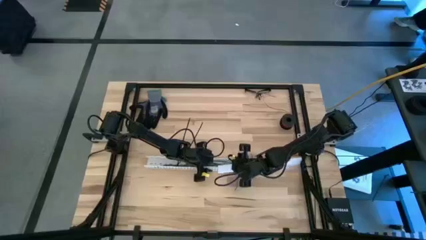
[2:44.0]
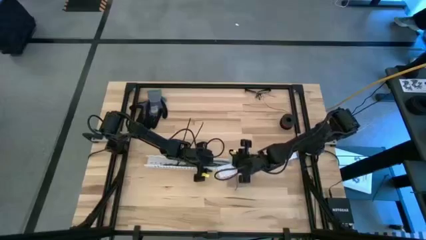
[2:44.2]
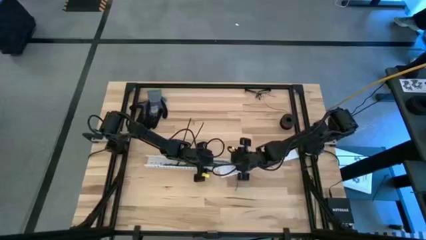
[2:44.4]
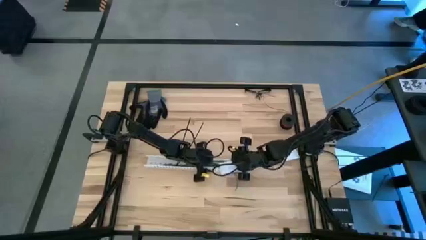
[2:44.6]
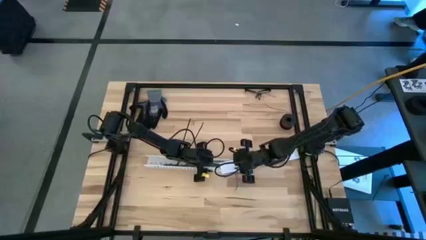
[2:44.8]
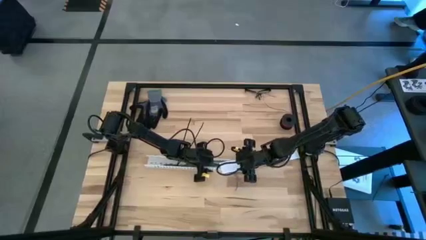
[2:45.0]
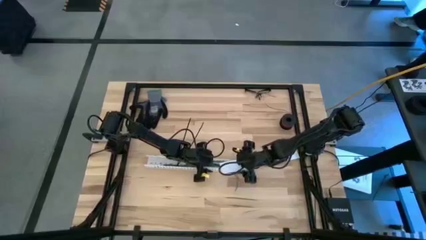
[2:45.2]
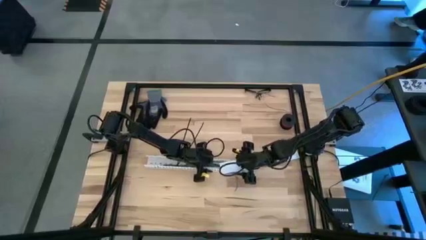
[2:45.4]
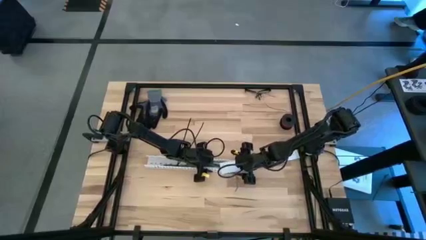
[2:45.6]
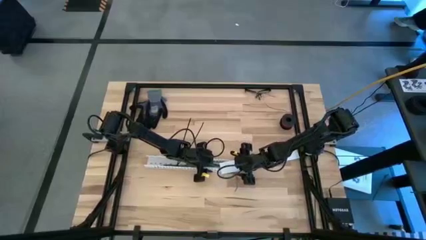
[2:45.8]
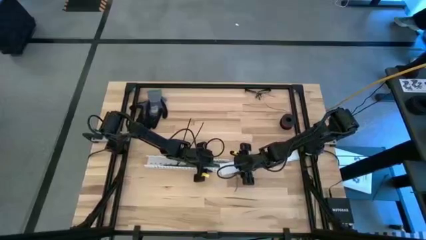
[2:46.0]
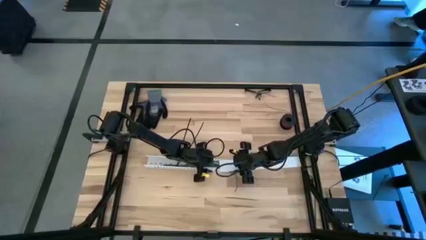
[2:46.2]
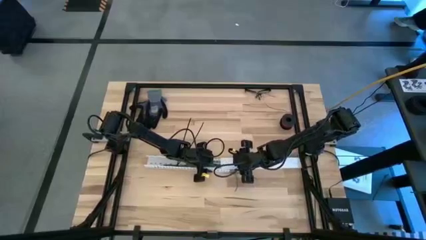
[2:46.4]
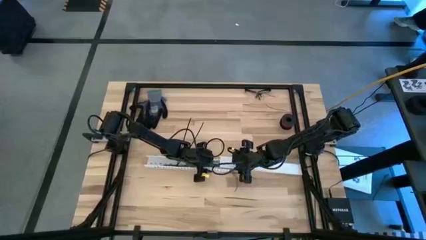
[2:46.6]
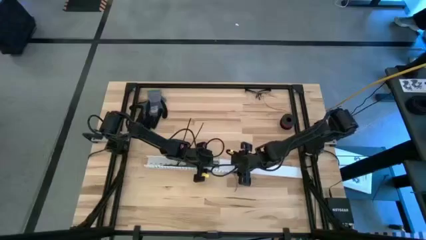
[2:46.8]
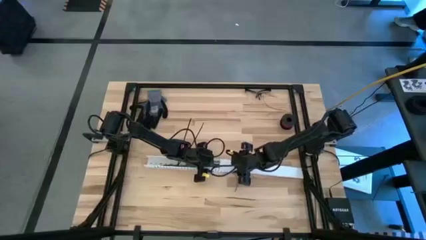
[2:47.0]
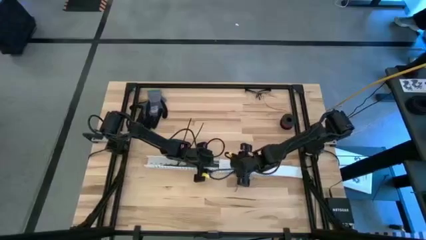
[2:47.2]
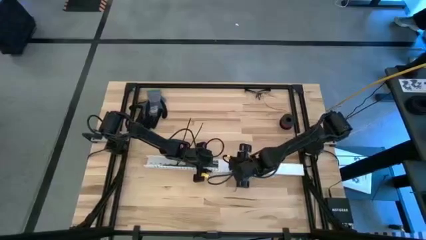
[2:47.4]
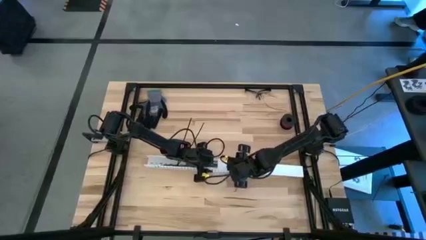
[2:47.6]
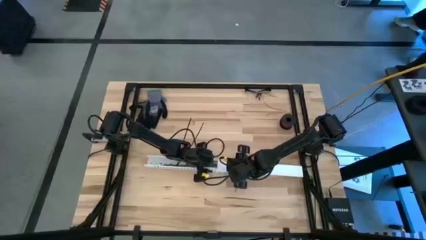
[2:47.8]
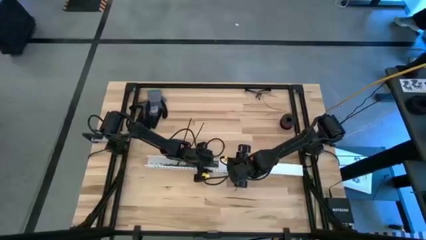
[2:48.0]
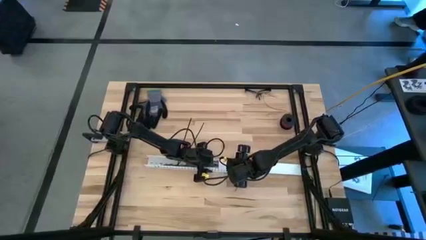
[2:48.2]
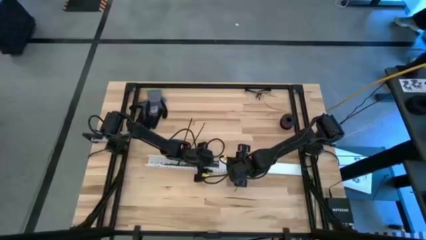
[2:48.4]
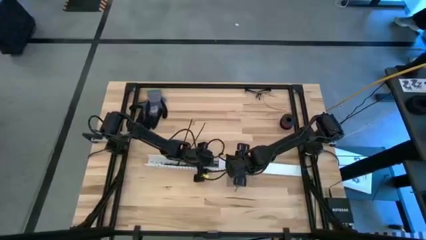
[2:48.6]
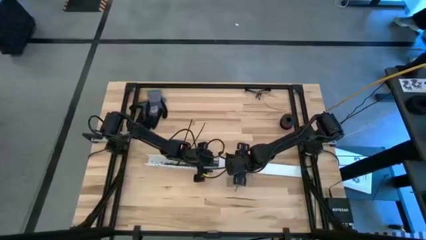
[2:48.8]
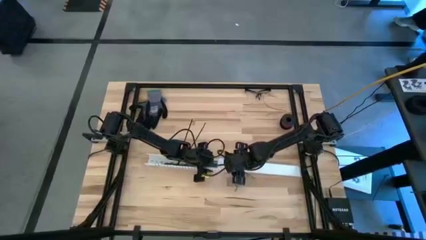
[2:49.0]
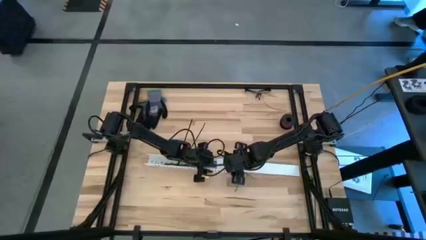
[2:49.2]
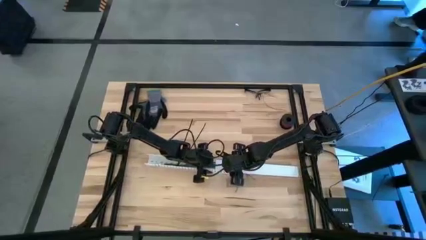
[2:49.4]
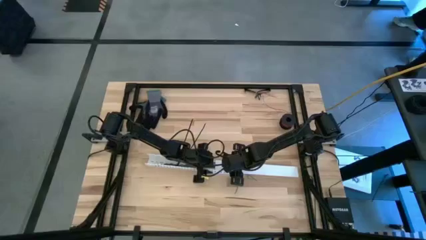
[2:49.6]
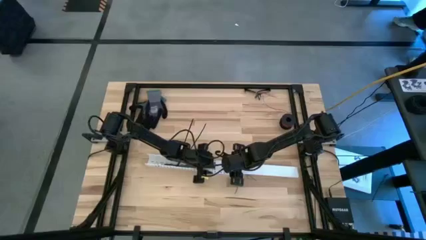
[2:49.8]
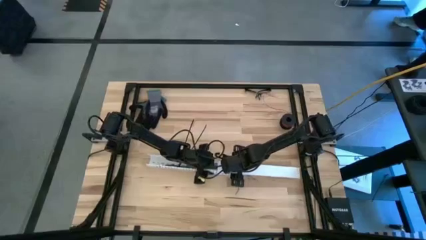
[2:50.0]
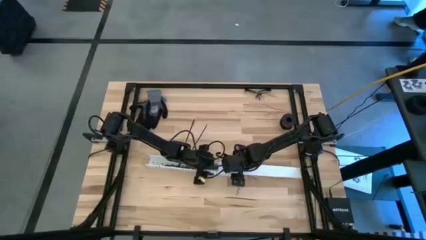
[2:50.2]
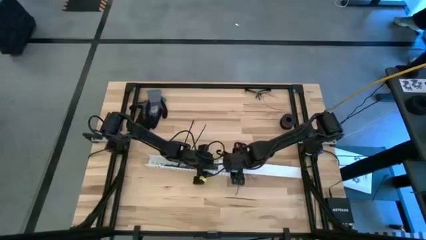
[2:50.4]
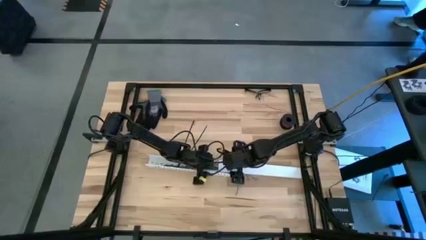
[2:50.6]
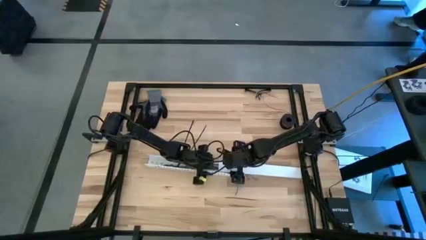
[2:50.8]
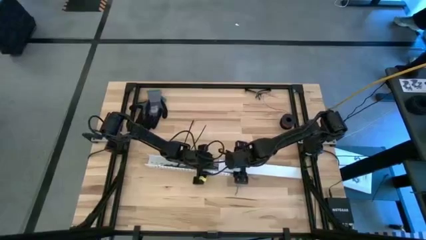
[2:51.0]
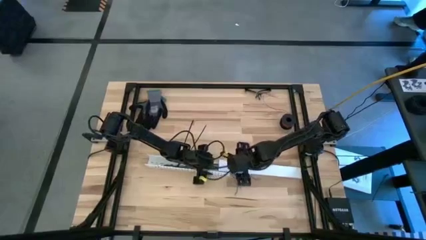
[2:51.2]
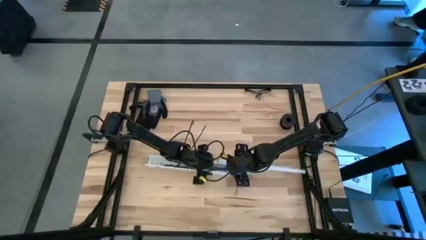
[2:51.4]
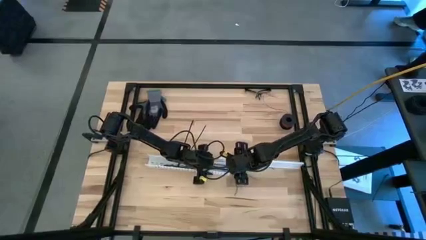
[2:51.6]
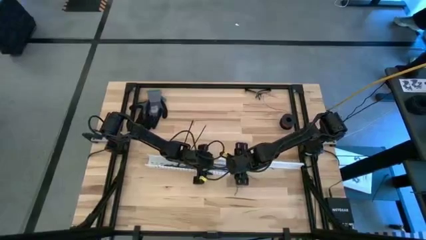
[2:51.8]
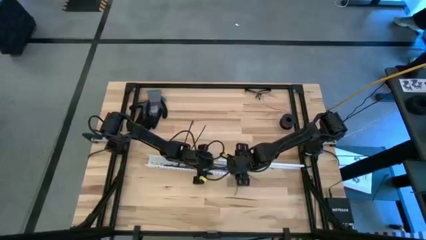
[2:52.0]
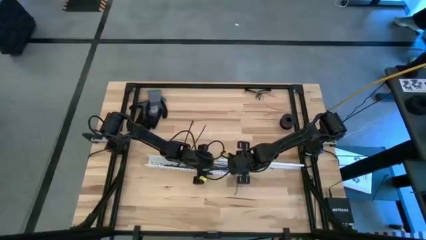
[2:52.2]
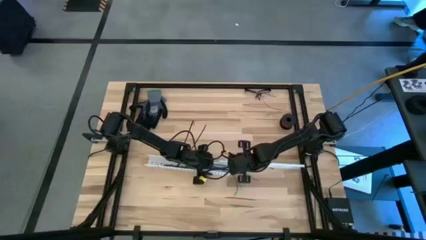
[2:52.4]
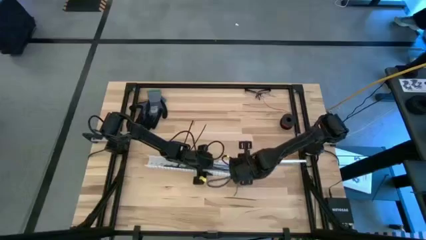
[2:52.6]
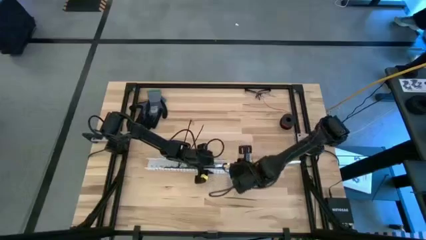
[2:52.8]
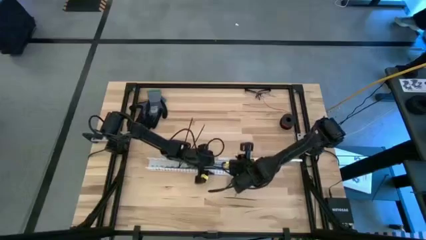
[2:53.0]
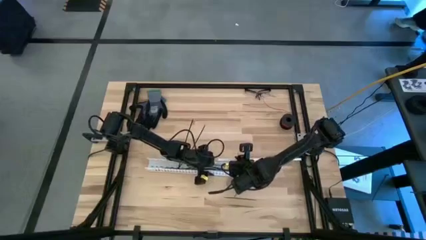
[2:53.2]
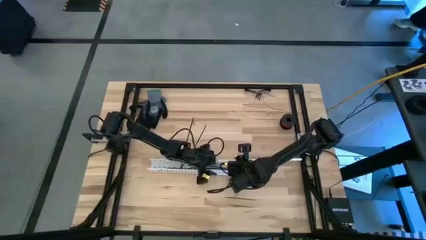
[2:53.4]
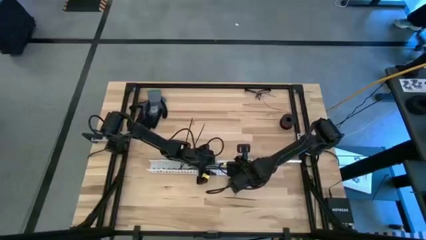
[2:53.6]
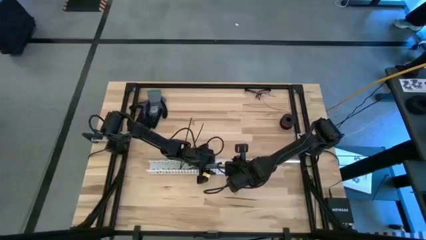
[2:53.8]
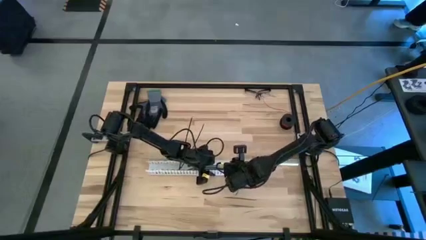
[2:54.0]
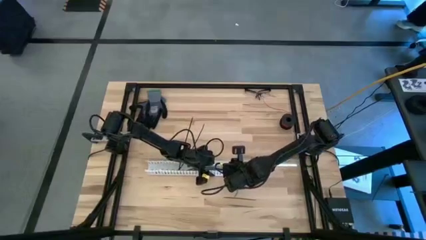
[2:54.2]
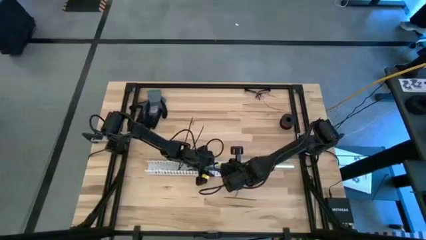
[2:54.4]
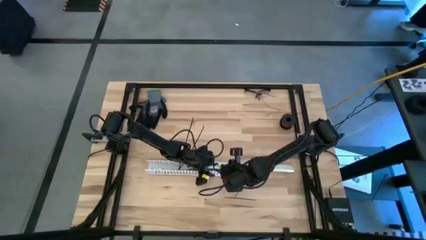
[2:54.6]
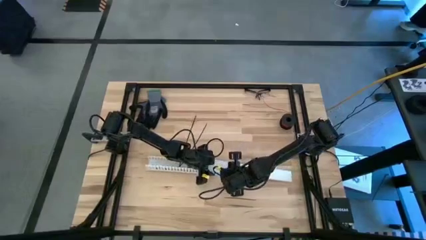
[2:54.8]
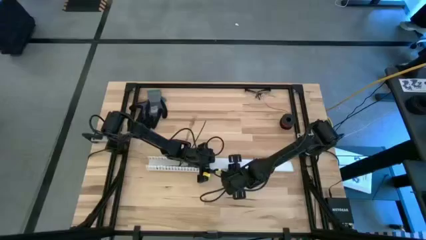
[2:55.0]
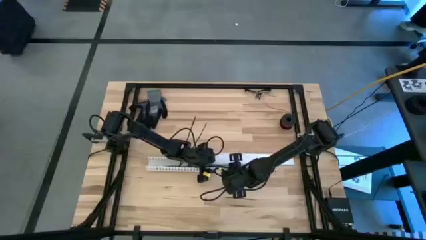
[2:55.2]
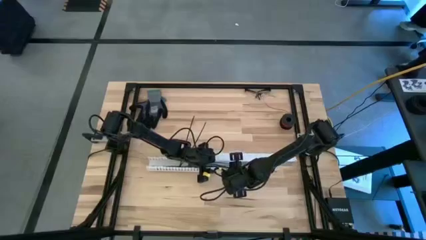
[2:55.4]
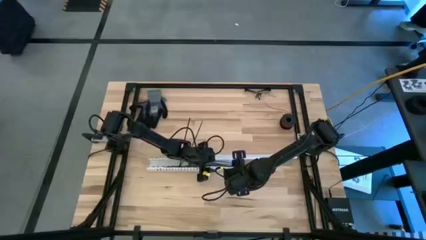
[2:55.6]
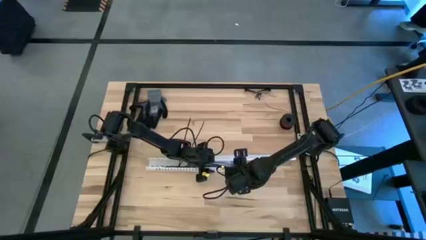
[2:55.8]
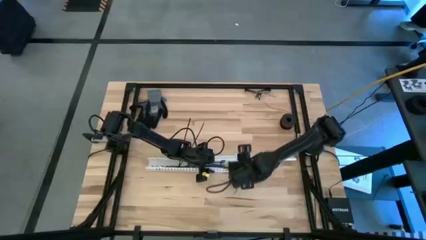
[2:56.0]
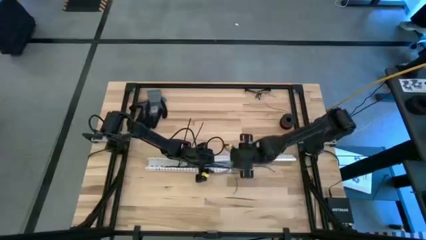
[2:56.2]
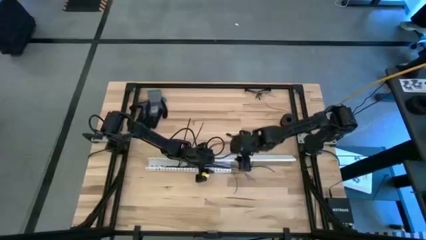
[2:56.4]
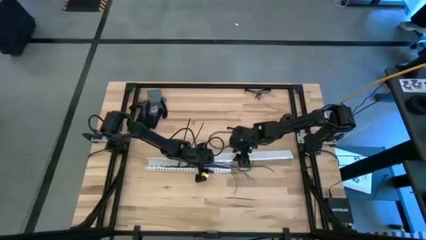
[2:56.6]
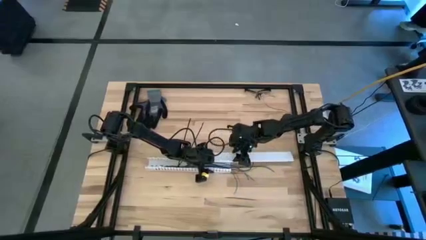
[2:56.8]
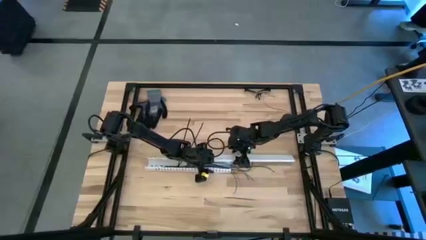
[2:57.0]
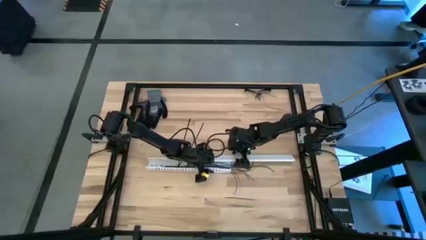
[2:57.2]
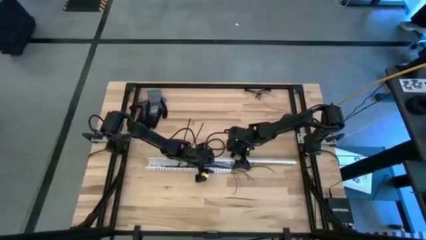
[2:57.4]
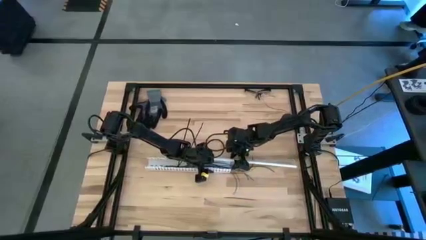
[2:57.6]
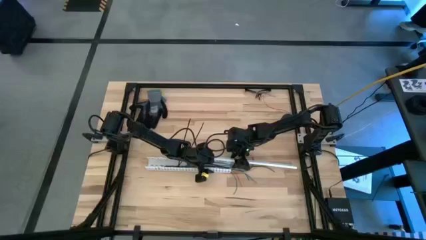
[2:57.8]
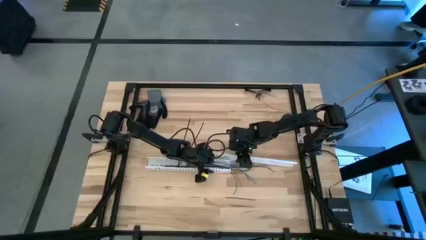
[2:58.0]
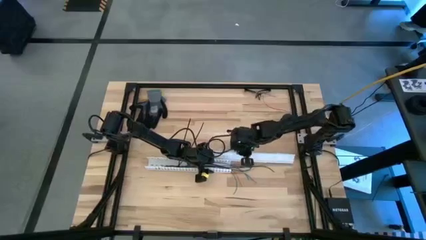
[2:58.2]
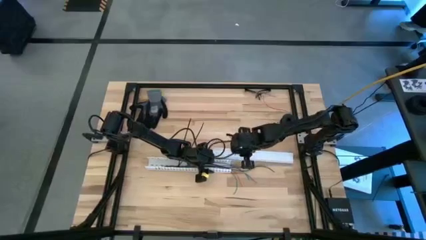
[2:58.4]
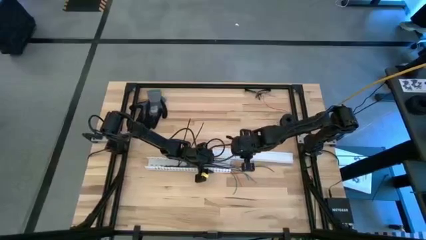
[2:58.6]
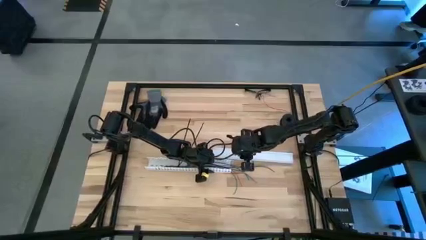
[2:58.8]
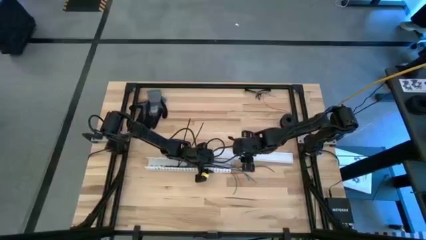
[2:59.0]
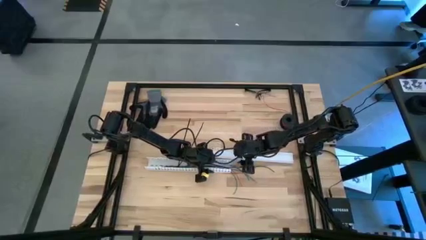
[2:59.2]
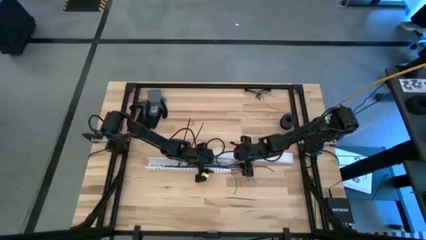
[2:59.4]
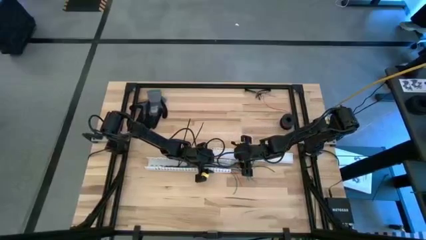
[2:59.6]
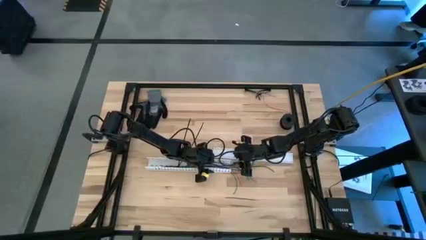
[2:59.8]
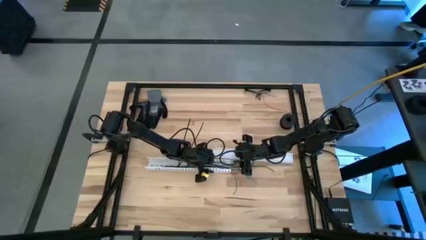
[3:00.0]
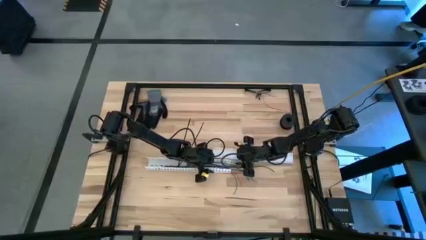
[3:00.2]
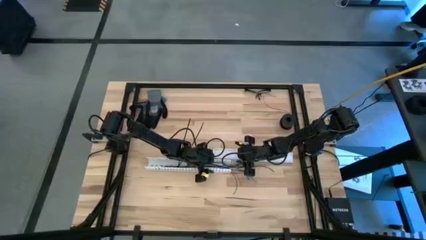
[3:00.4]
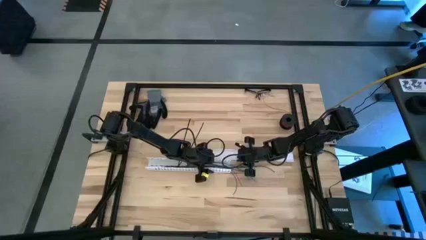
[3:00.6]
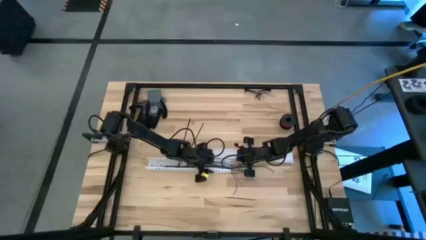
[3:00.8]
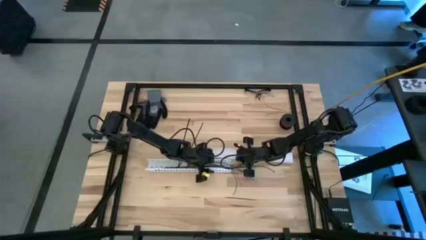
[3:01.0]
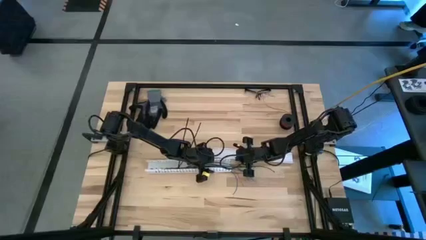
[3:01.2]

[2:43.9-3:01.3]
Task: Ziptie cables
Close the white cable duct
